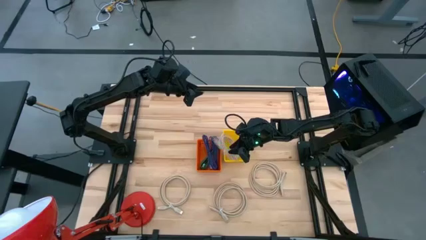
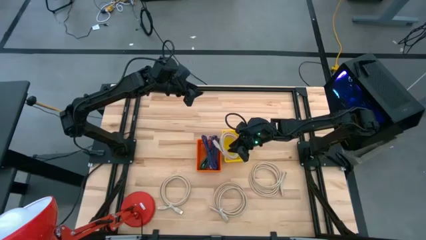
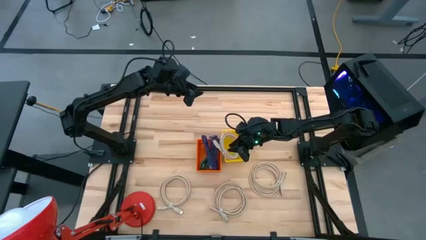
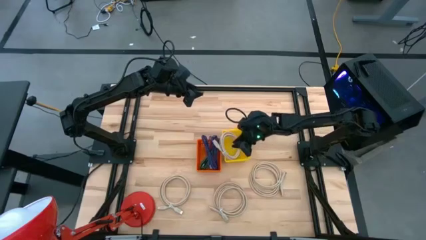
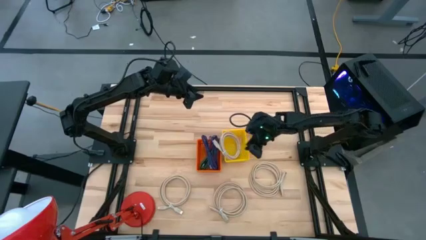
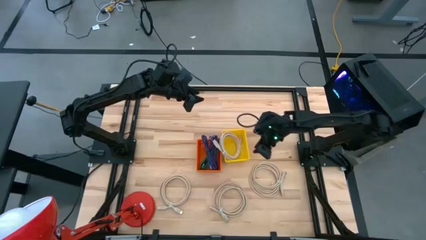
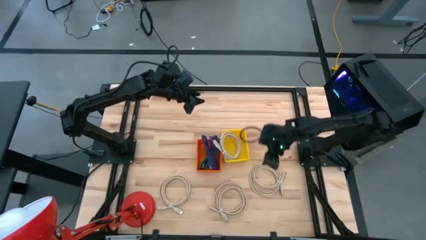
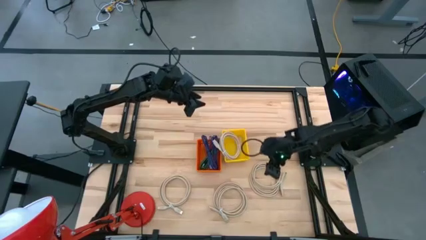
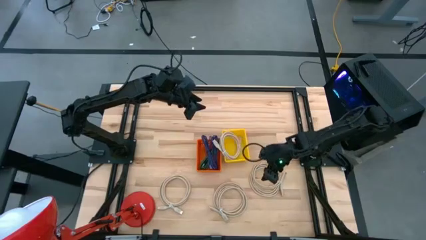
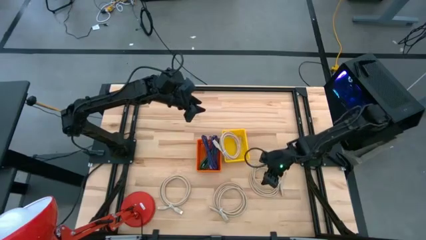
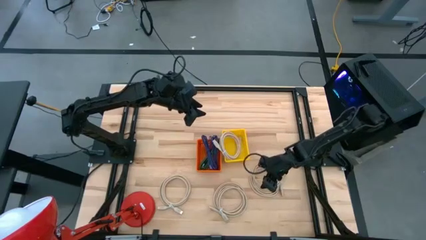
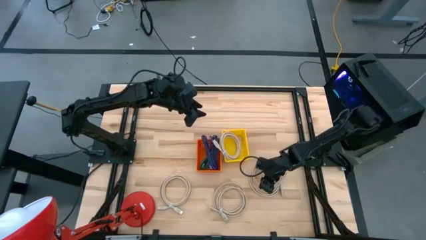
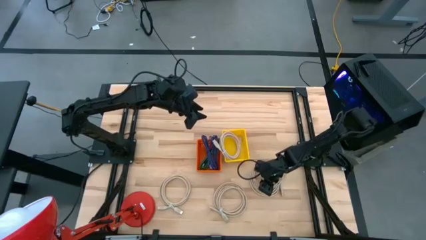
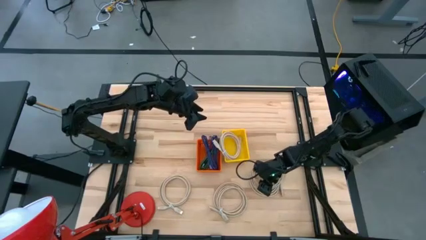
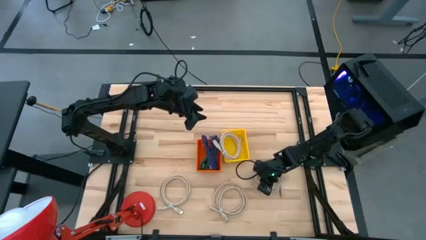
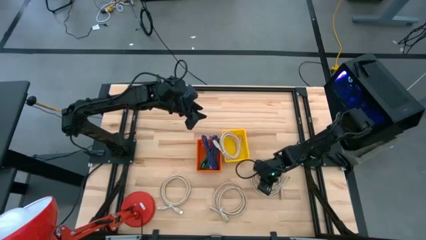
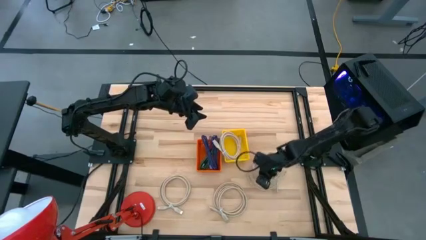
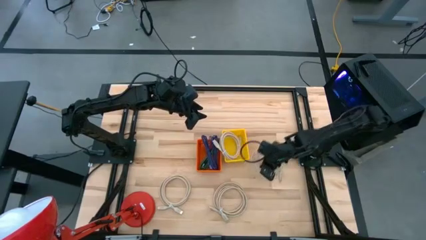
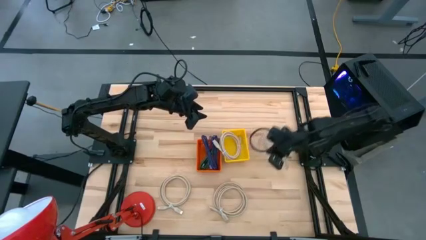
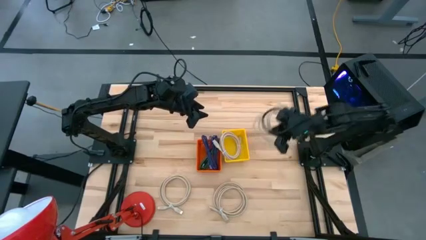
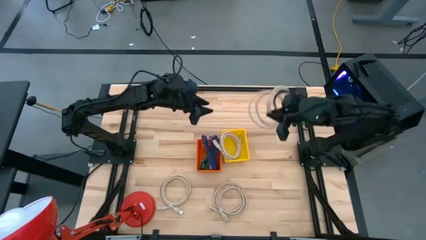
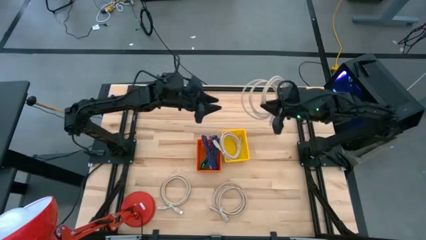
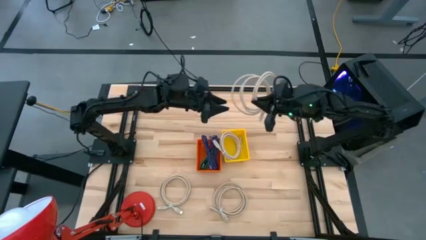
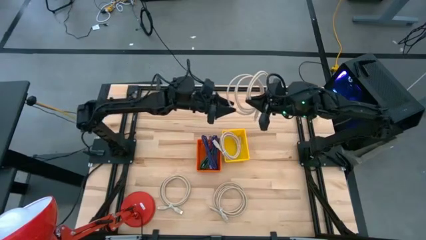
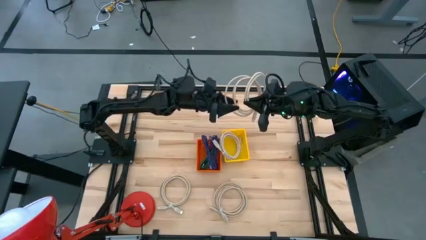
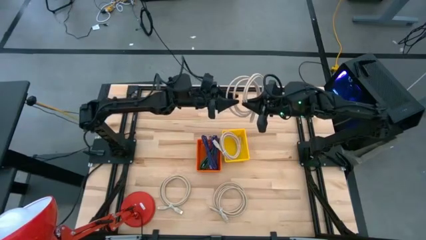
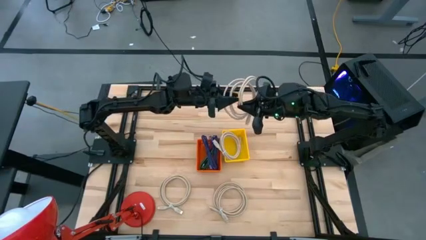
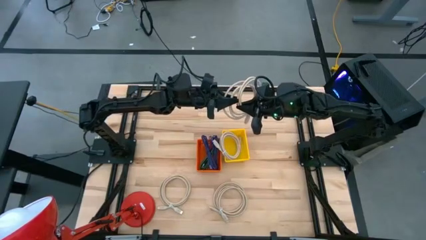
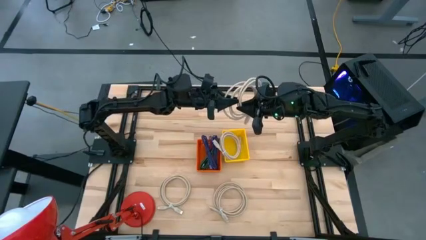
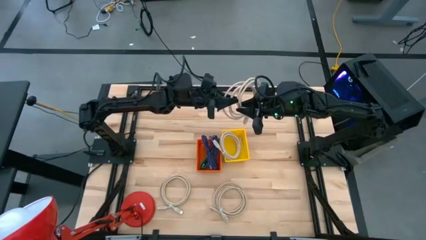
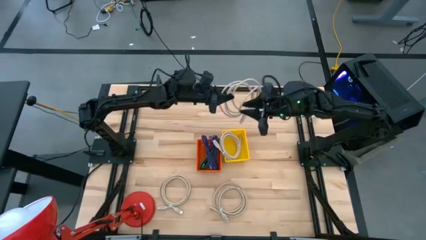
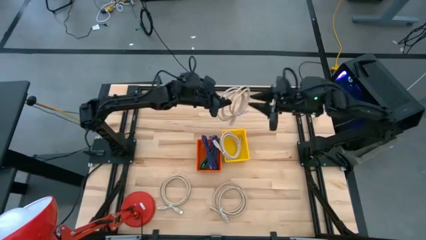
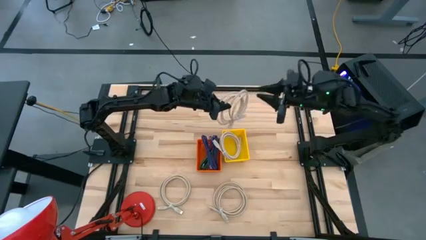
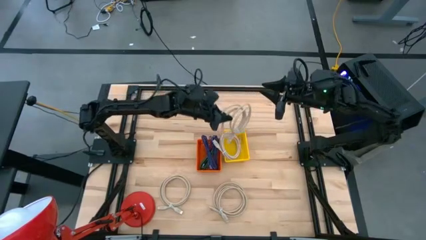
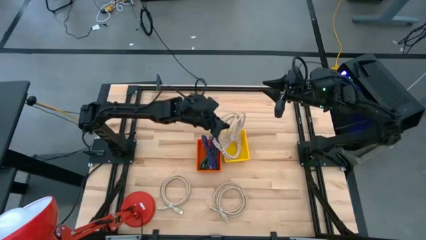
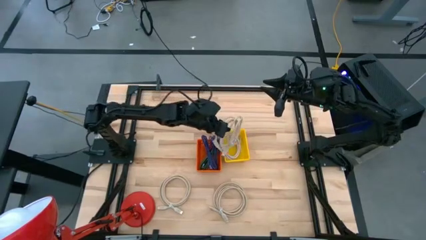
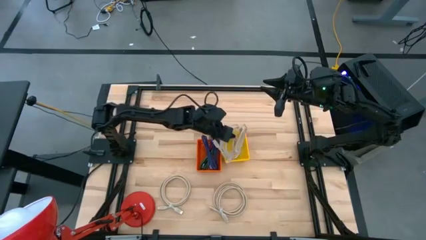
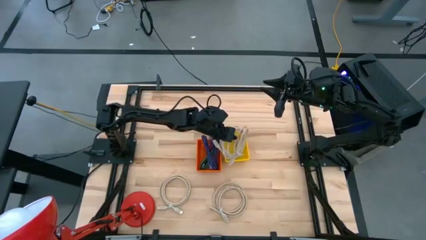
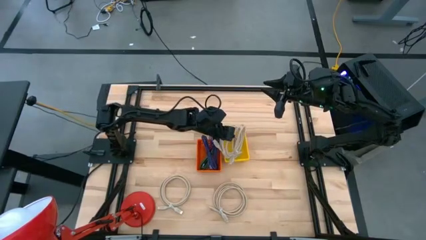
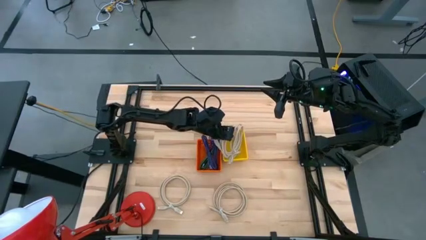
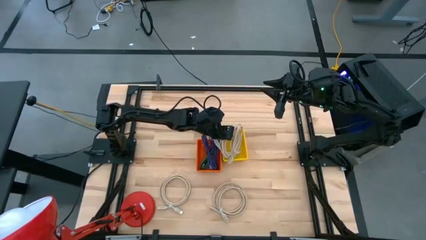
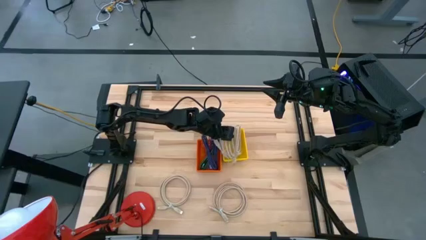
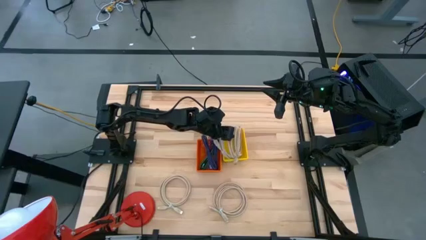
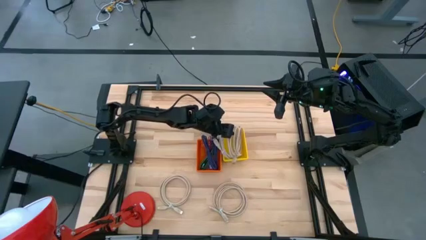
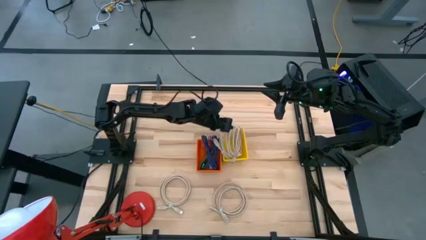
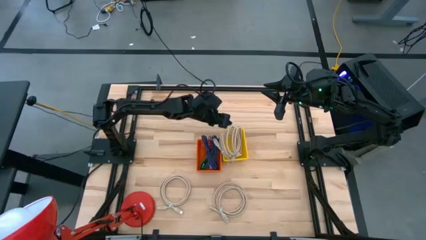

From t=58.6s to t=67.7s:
Task: Pick & Place USB Port
Put the brown HDMI cable into the yellow basket

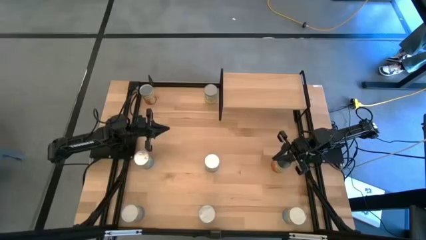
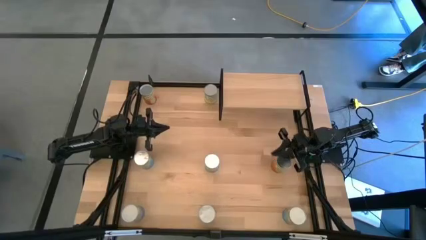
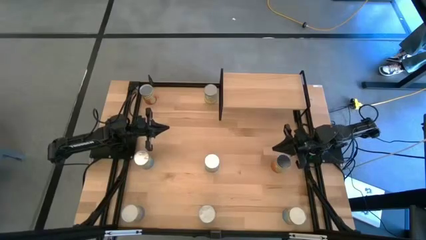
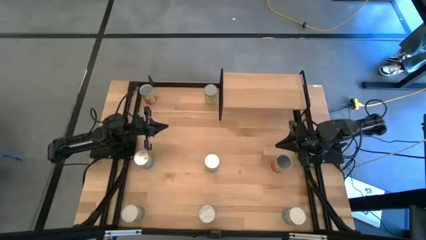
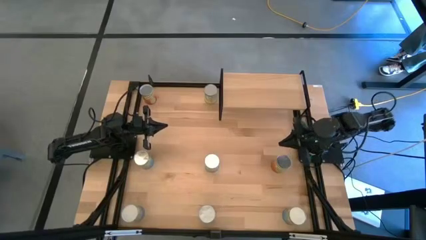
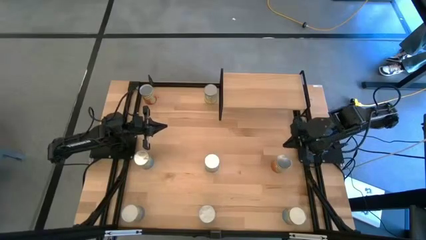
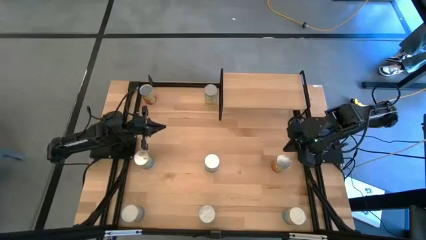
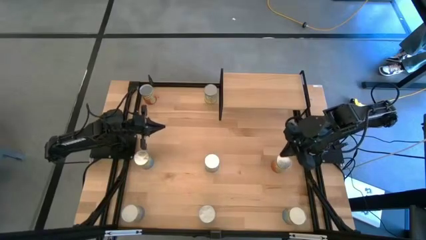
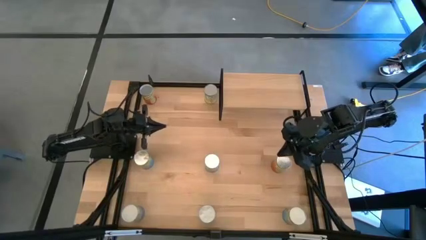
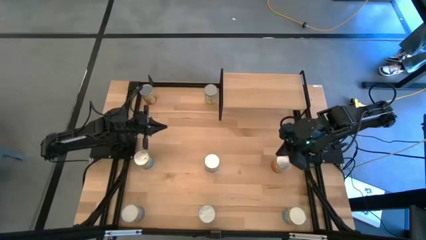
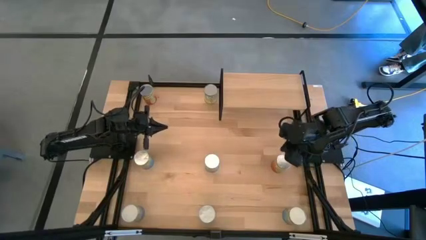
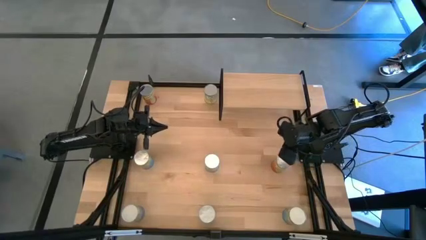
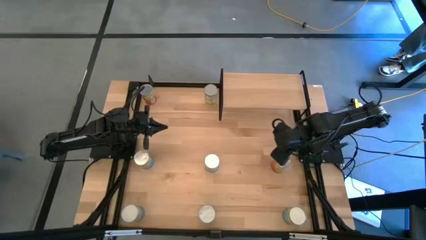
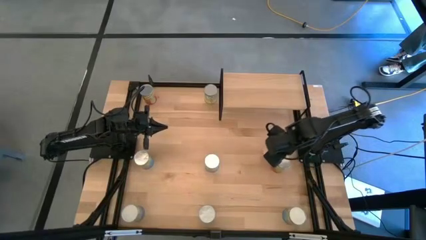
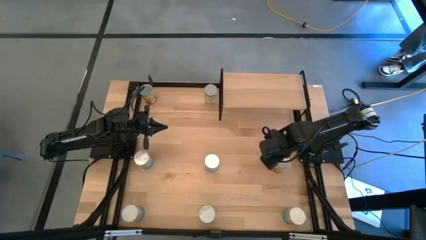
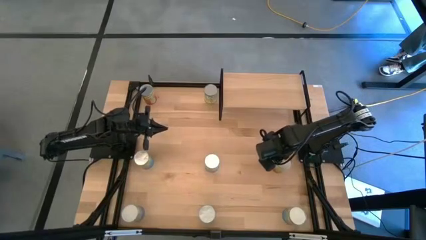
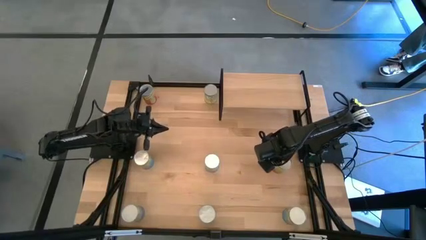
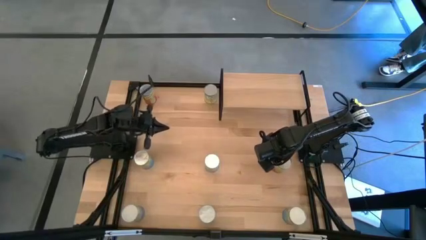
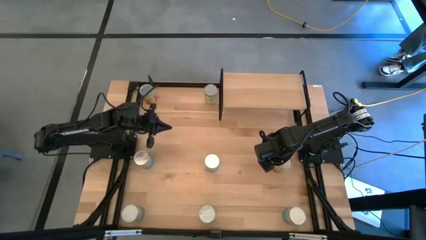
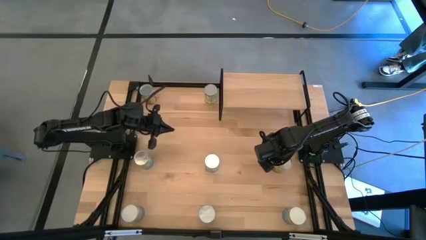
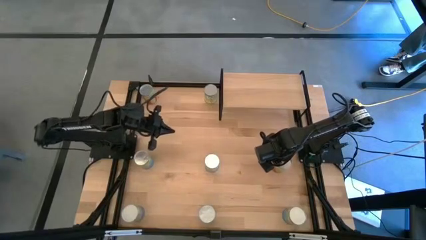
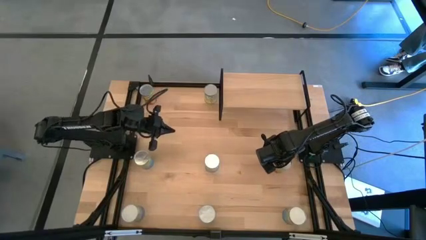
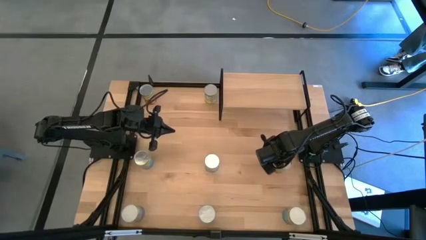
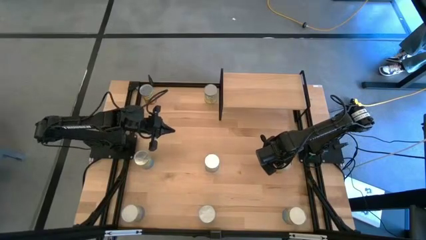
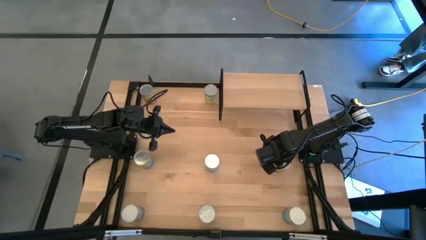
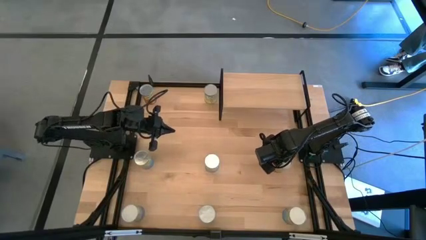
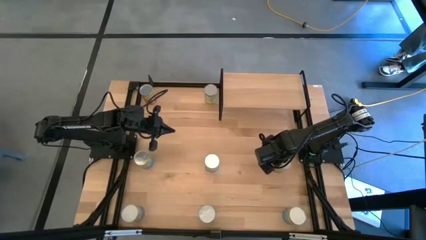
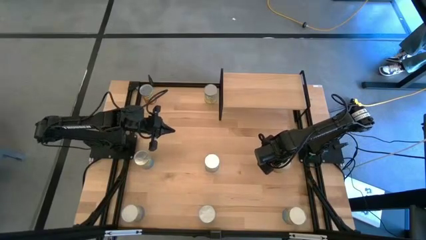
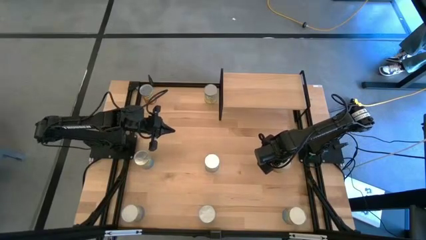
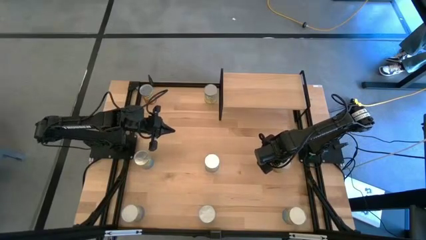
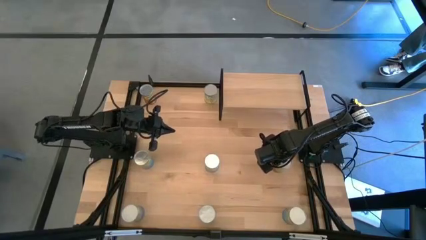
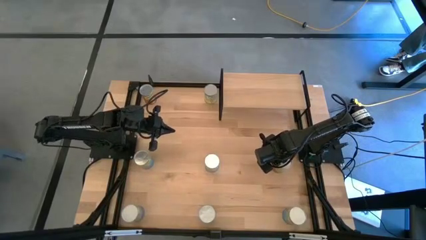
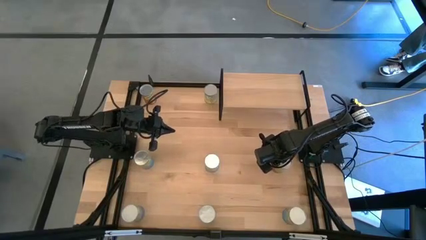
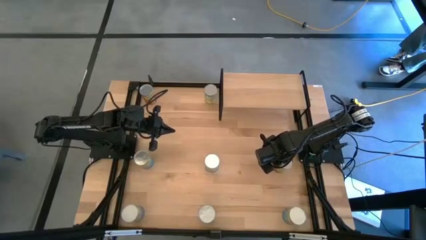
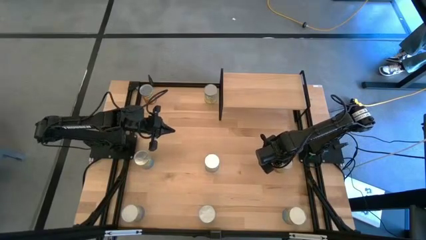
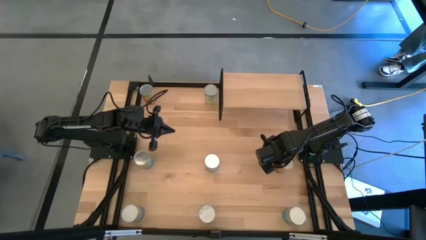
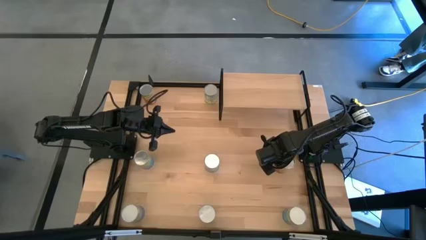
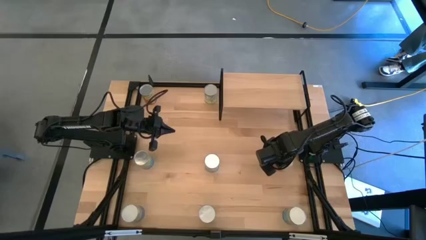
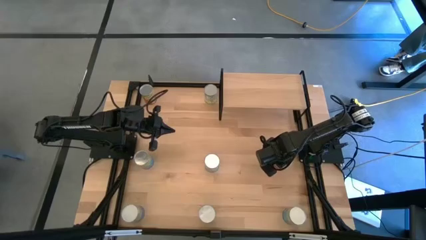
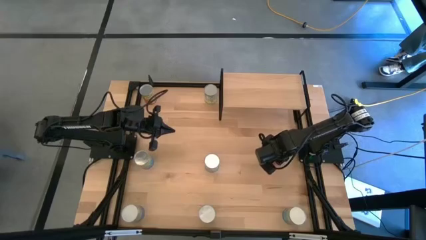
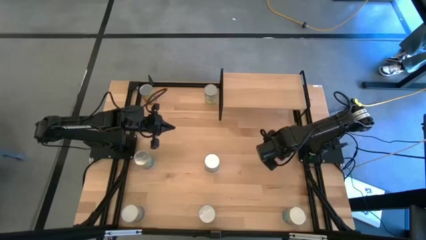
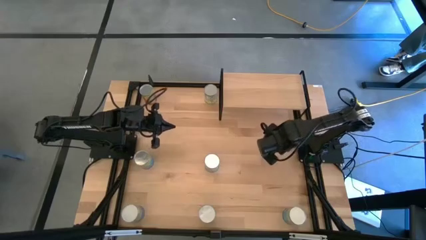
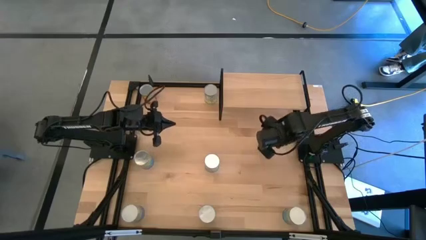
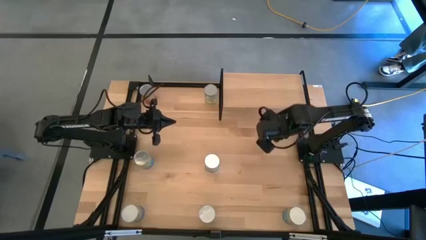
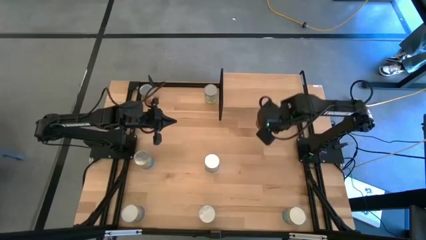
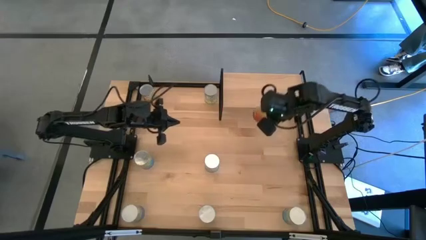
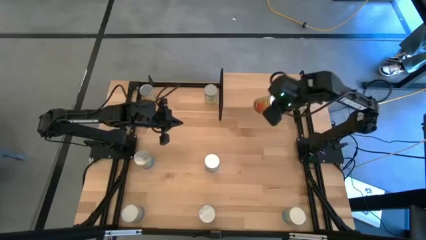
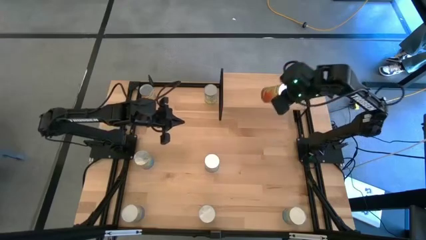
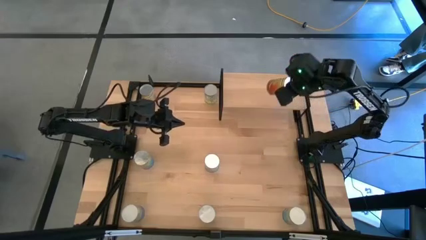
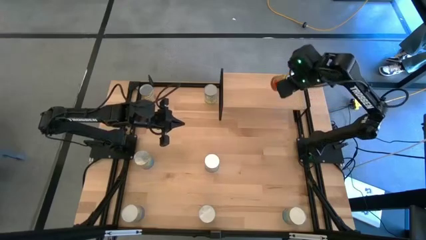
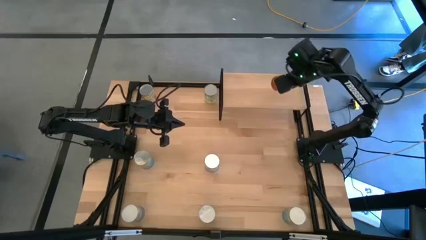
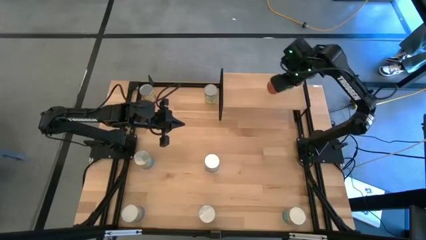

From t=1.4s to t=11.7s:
Task: Pick and place cans onto a shelf
Put the canned green beans on the shelf
